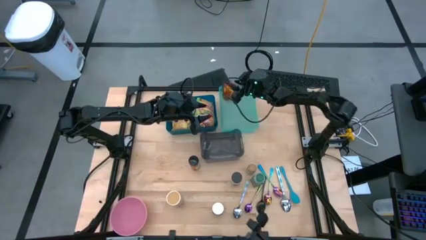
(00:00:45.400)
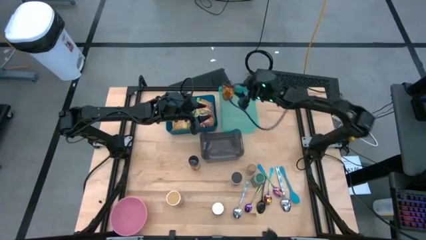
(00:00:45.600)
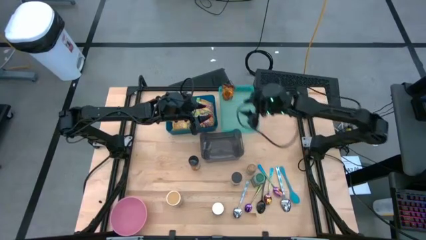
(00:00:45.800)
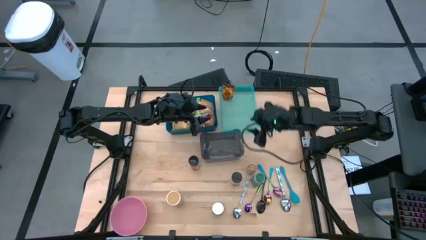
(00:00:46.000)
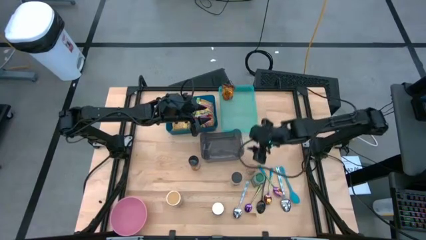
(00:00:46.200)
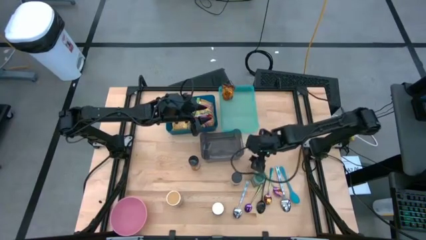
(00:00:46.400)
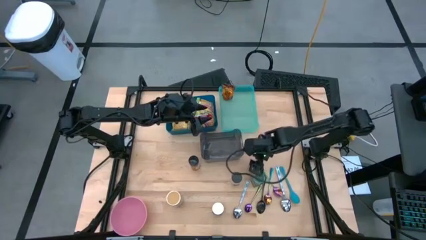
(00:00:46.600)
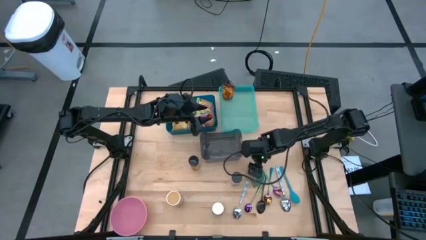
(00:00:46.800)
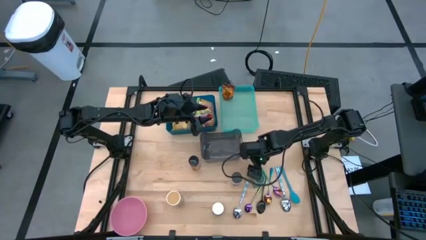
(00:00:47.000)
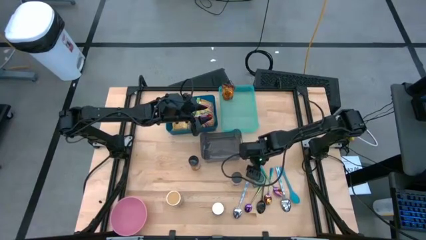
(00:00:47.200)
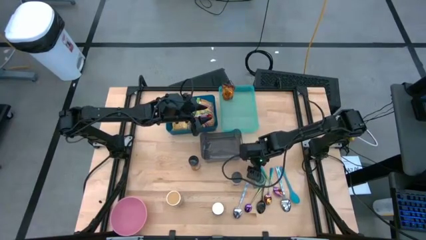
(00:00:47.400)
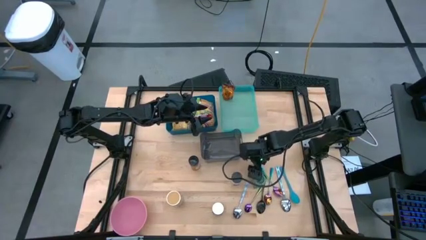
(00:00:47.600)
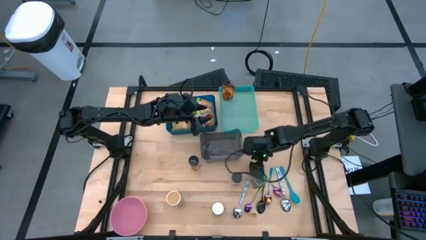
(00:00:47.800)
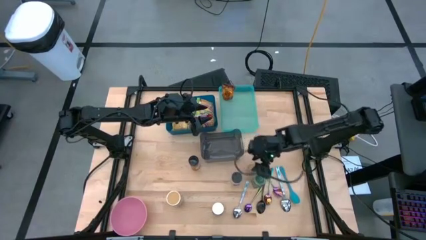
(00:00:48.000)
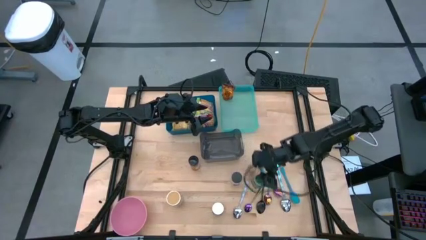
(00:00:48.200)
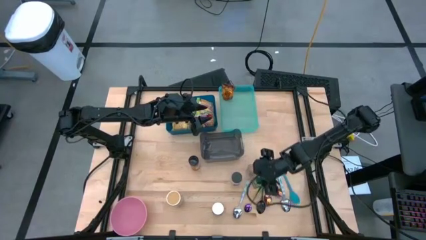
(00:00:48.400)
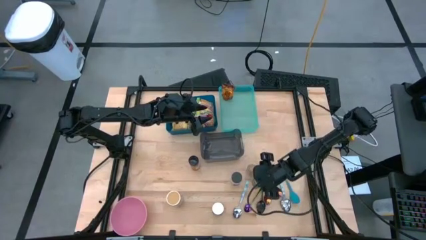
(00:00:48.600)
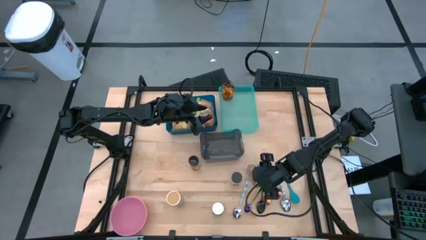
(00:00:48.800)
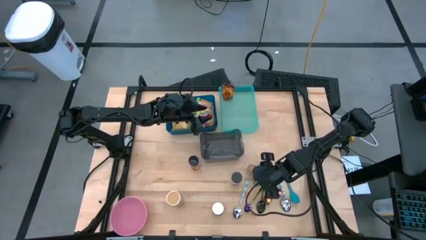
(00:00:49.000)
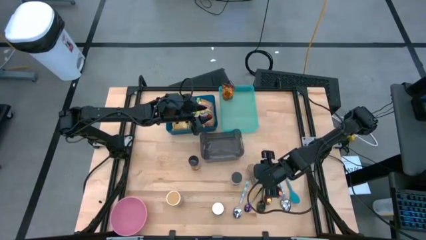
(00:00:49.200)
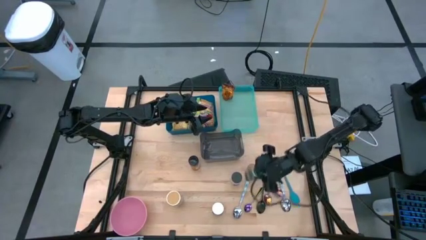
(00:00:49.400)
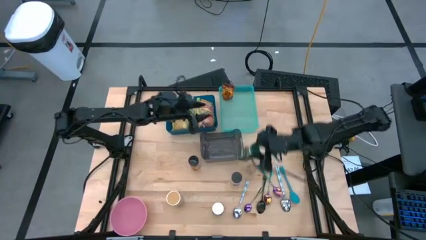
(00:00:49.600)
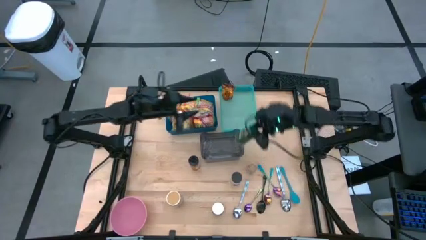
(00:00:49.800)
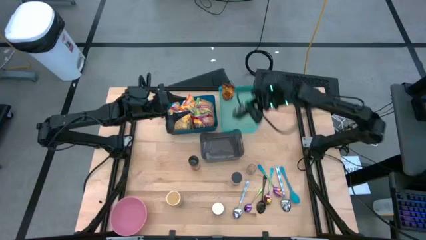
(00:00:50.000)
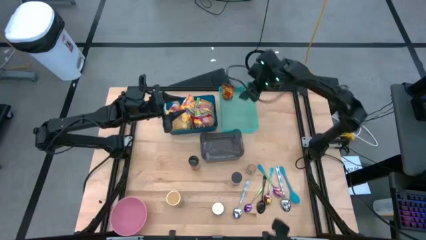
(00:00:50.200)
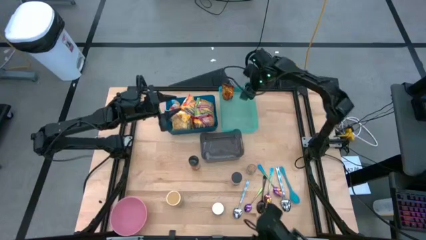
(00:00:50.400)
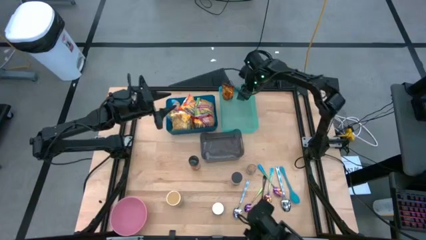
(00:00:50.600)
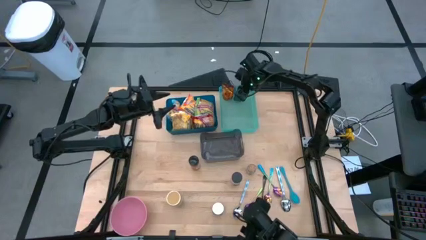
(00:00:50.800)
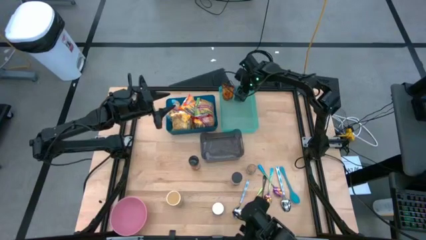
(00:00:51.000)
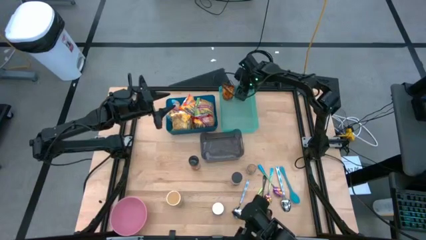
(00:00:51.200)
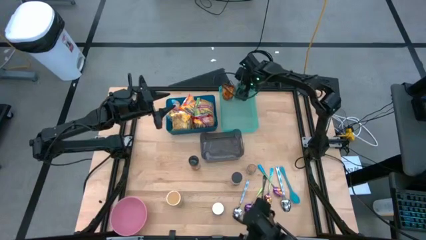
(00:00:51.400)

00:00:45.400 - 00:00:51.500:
Task: Pick & Place Food Item
Put the green seasoning bottle into the green bin

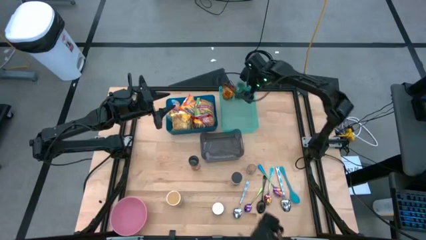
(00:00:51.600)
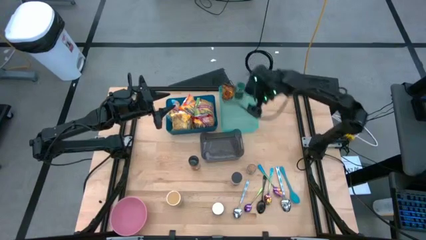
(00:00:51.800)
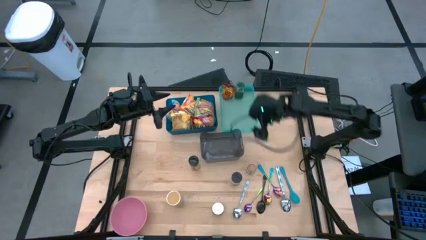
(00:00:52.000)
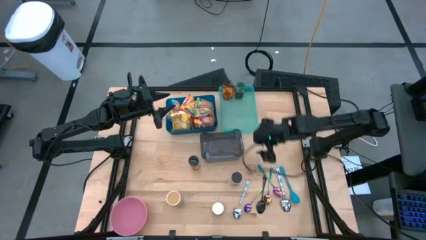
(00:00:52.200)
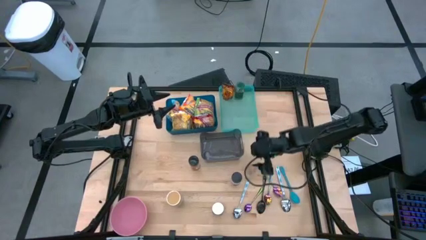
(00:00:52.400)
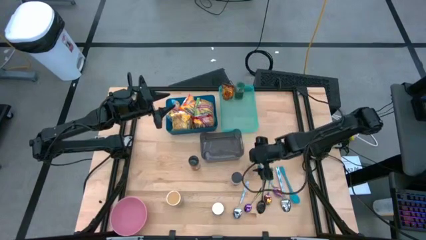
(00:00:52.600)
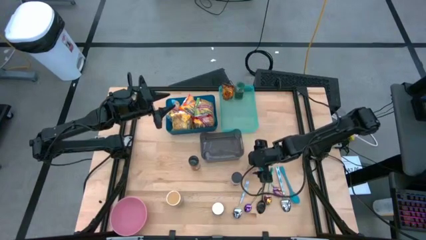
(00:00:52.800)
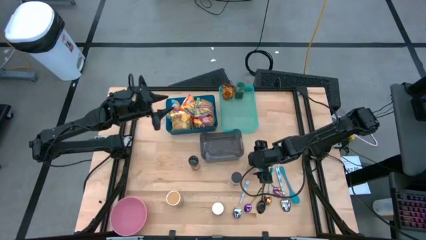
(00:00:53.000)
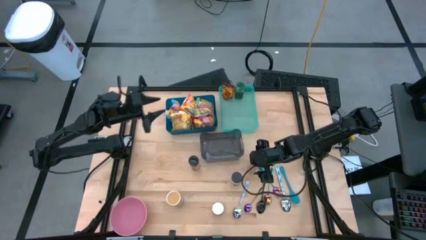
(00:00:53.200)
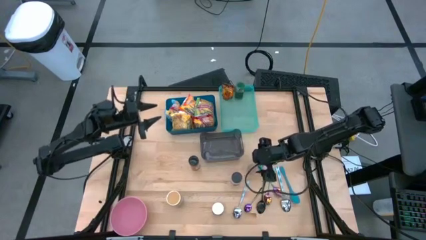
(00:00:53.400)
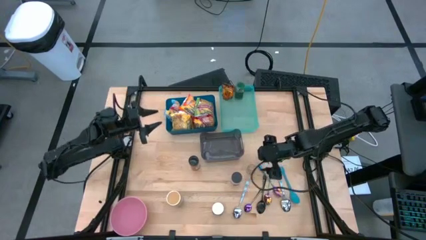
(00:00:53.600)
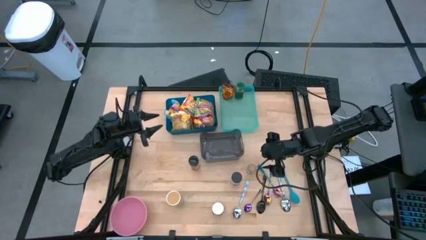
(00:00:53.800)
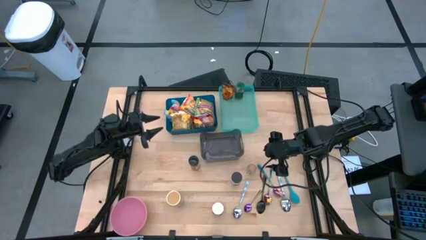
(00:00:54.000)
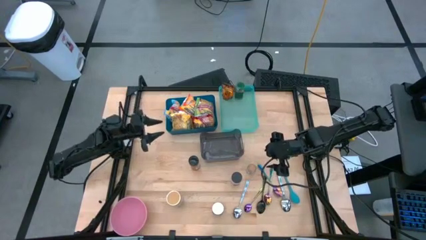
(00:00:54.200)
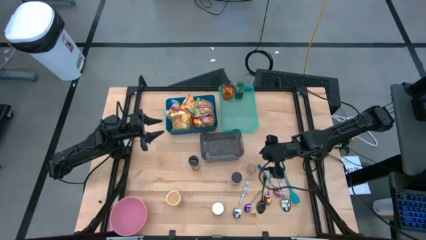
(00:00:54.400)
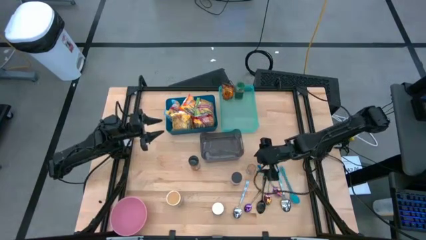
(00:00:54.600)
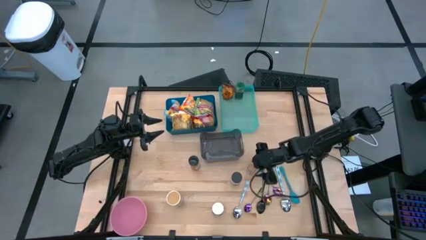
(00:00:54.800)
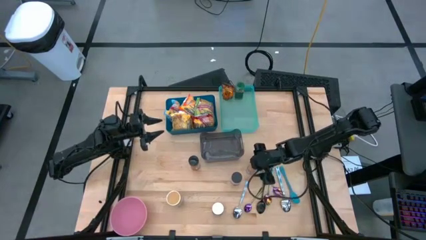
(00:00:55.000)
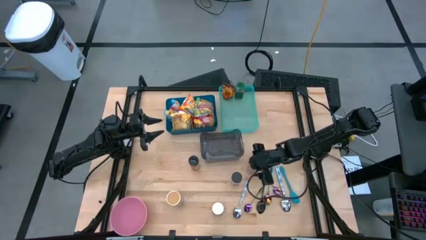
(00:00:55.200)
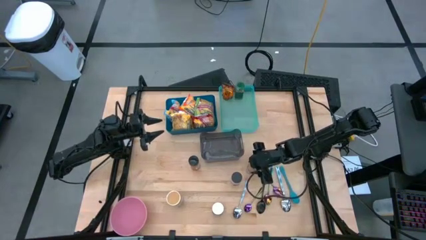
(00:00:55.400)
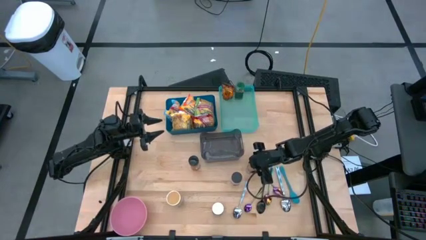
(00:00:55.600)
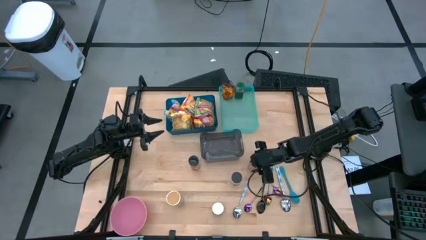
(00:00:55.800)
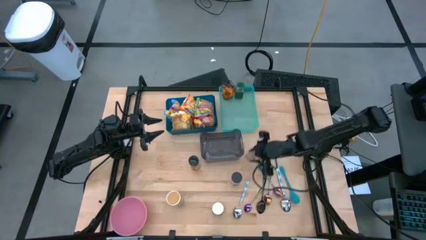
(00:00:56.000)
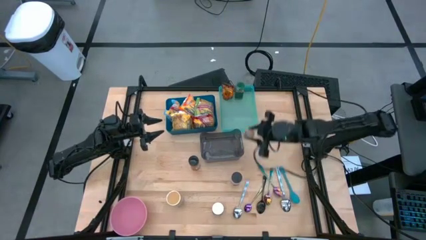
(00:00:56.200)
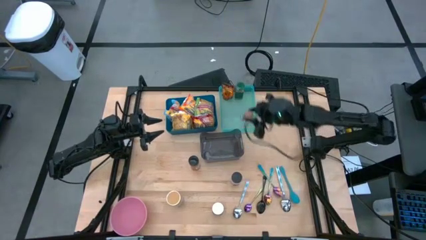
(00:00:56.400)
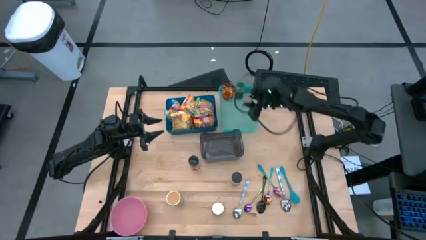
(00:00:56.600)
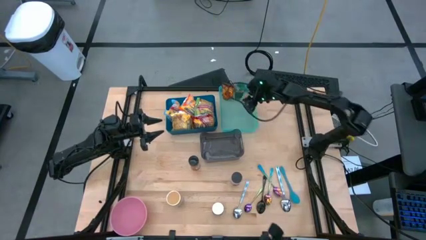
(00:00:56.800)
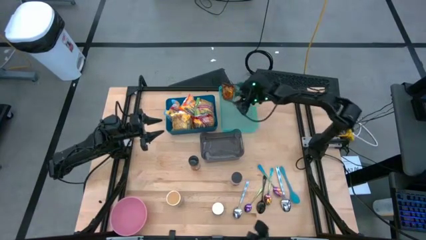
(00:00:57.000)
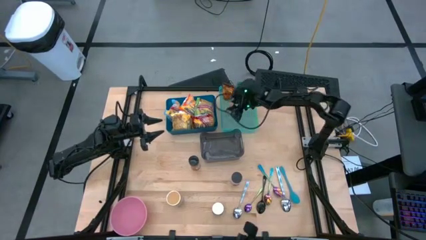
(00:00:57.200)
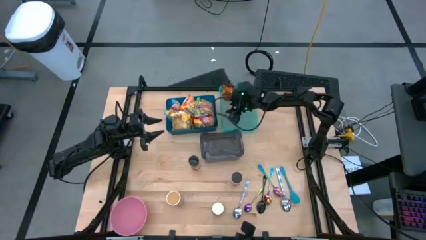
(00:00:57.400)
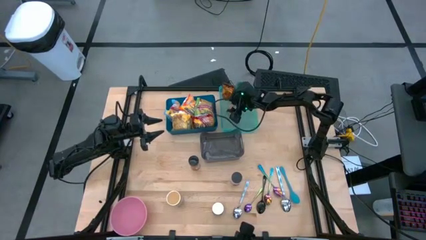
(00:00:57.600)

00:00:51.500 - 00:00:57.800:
Put the brown seasoning bottle into the green bin

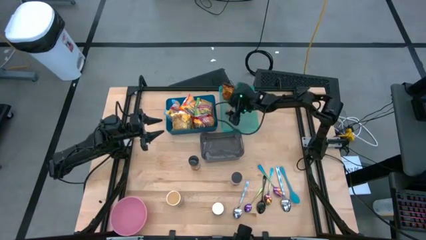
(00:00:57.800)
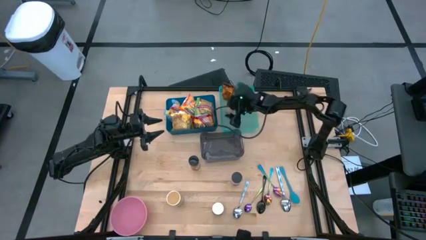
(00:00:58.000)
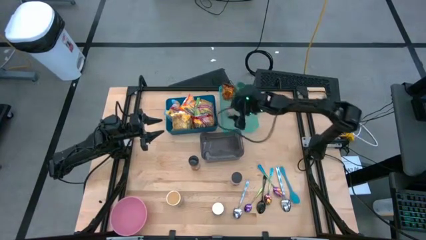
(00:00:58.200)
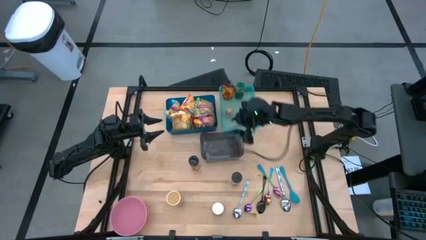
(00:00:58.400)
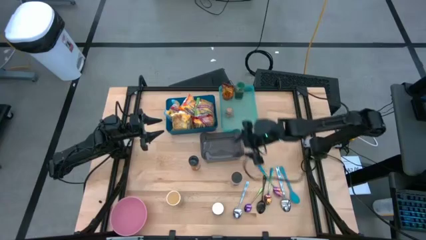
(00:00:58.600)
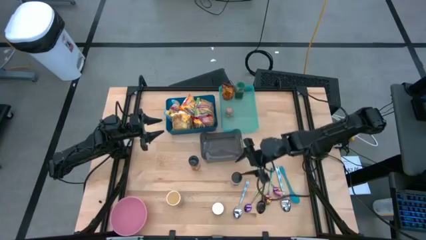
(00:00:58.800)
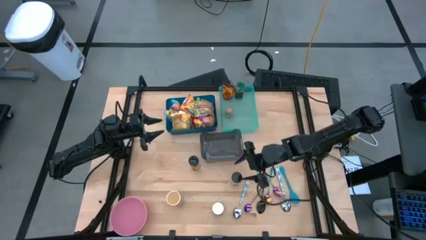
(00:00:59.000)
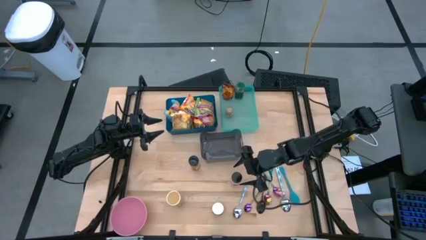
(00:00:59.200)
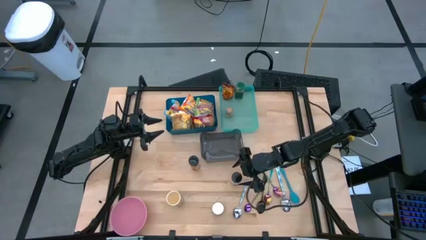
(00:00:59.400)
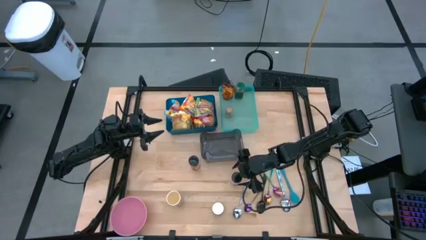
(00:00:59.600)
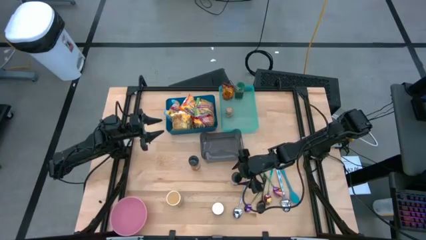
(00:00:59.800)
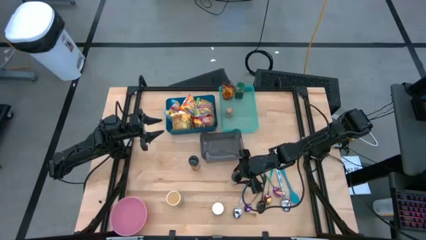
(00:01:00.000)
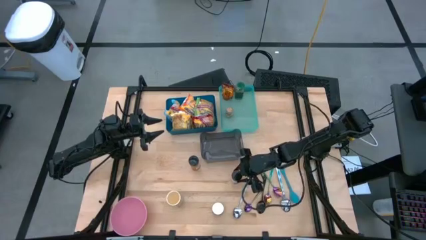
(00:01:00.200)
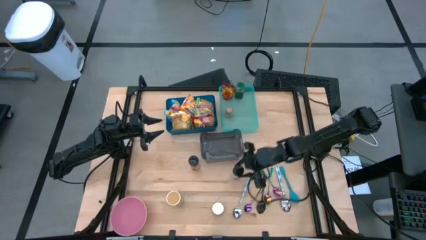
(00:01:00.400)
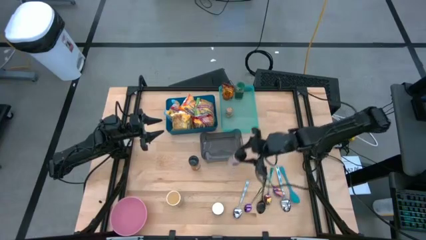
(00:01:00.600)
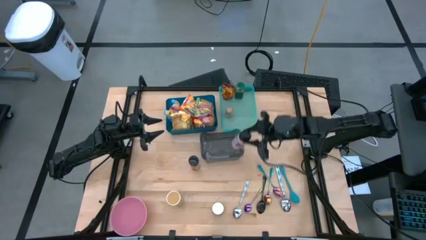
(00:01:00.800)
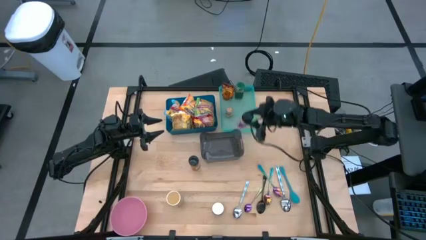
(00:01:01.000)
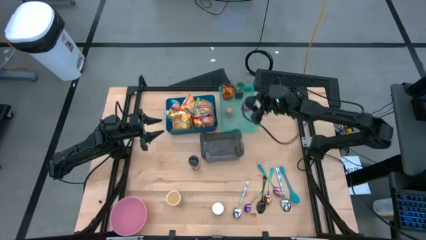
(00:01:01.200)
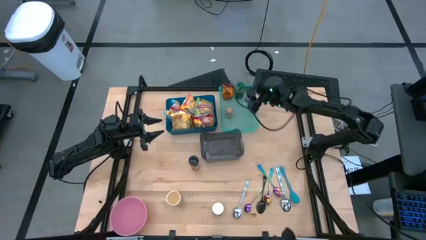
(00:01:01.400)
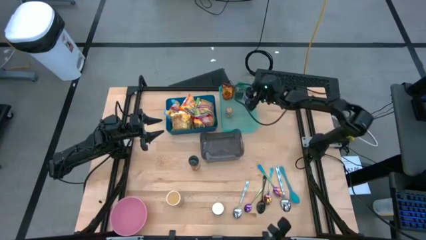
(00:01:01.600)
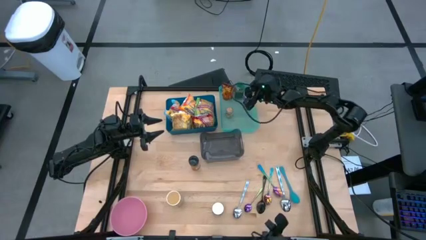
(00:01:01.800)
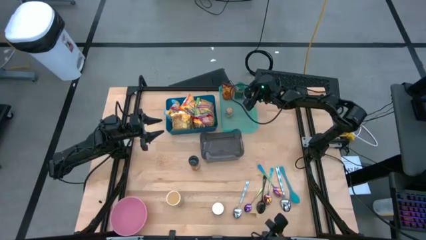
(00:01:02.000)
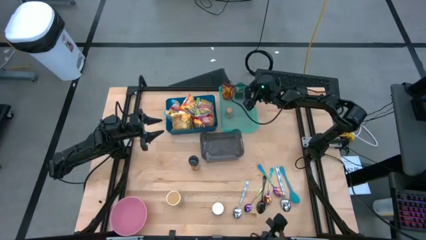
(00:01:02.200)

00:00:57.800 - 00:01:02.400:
Put the violet seasoning bottle into the green bin
